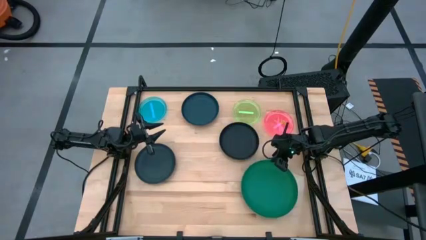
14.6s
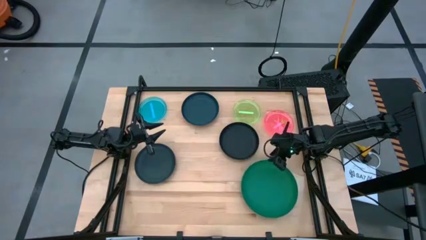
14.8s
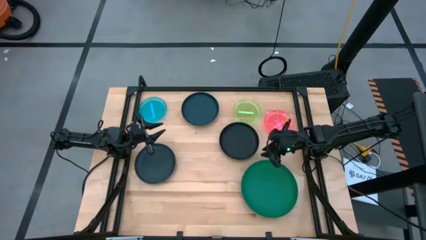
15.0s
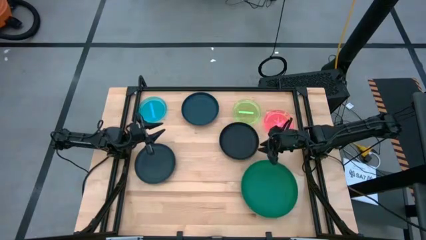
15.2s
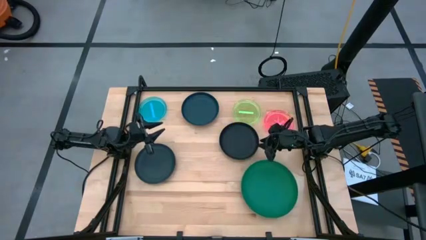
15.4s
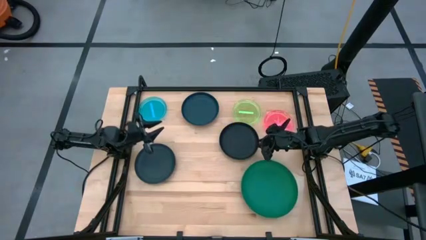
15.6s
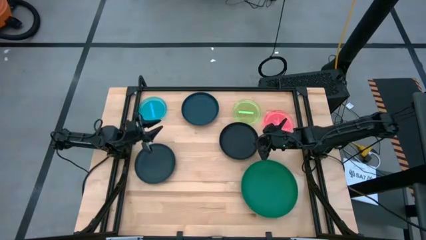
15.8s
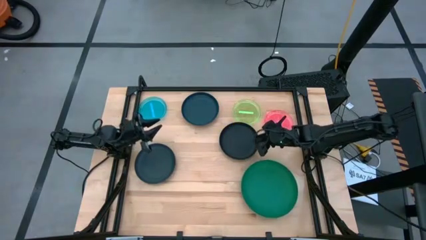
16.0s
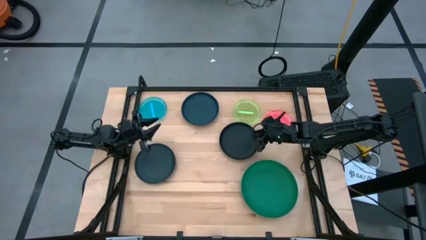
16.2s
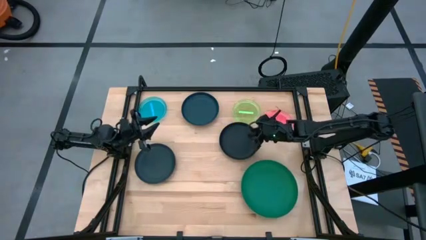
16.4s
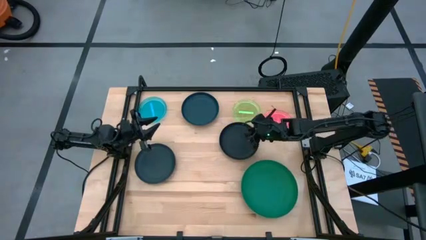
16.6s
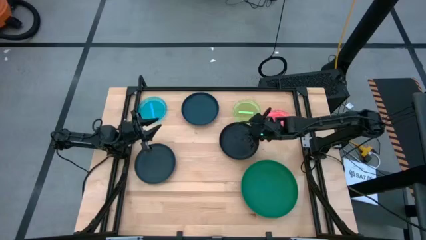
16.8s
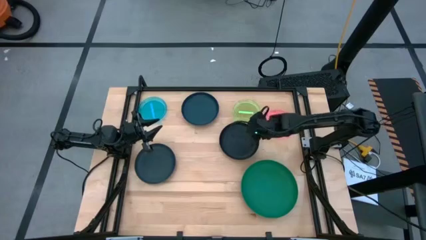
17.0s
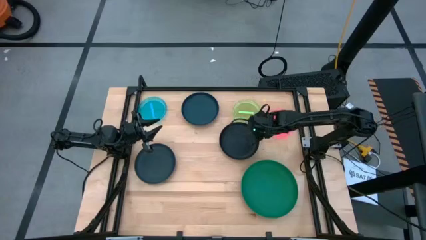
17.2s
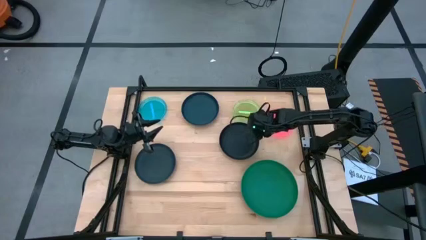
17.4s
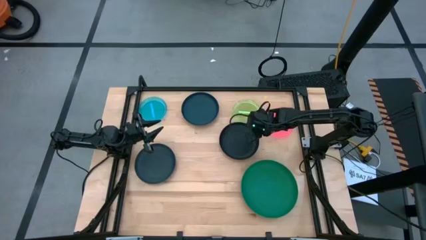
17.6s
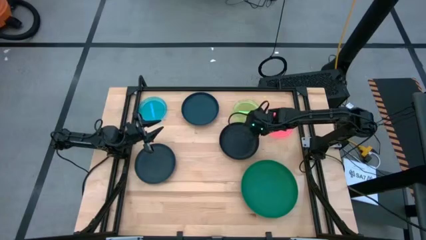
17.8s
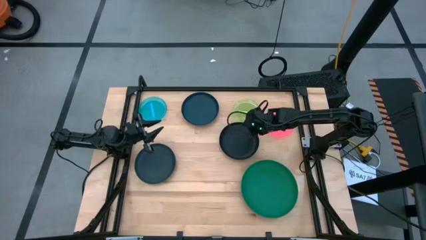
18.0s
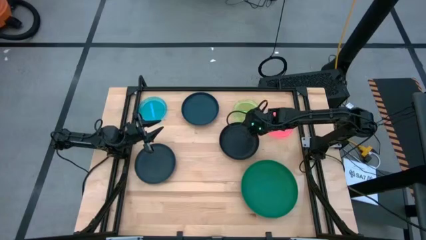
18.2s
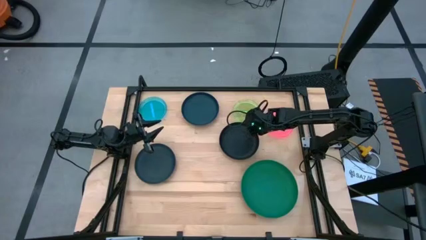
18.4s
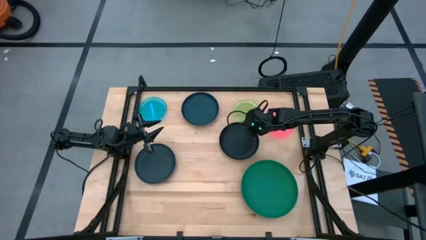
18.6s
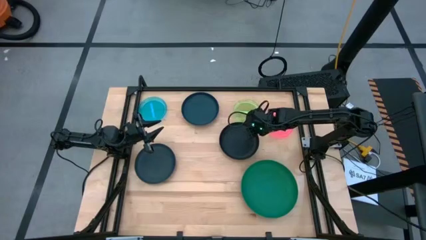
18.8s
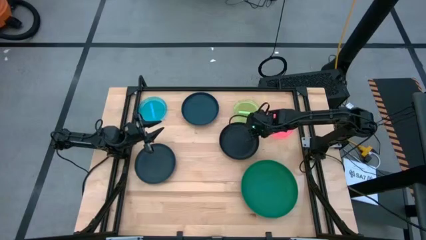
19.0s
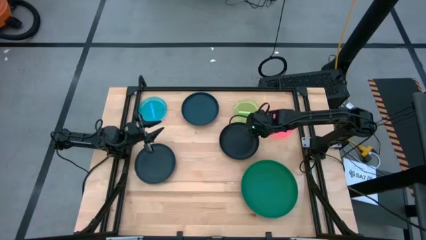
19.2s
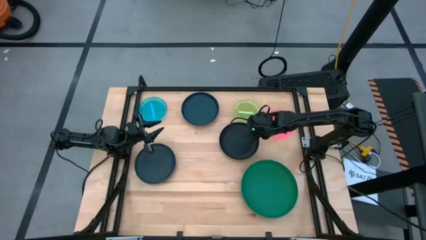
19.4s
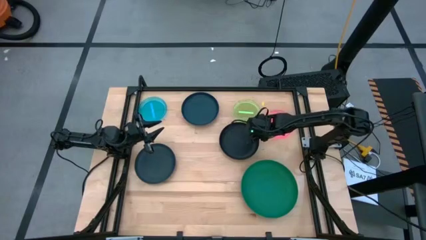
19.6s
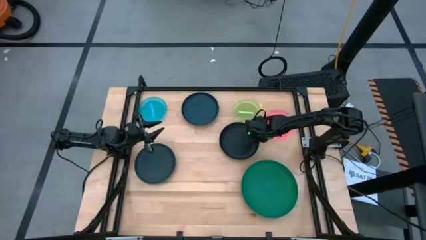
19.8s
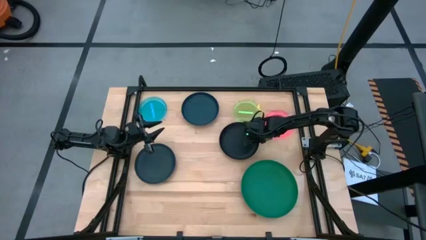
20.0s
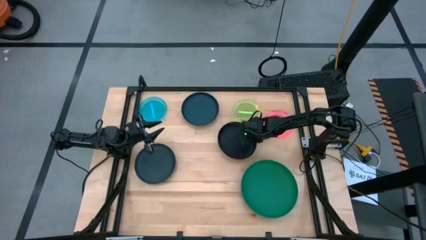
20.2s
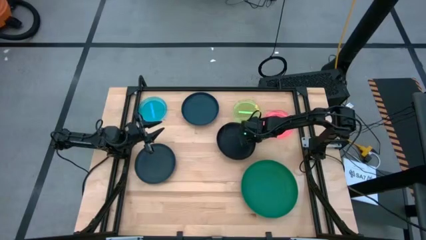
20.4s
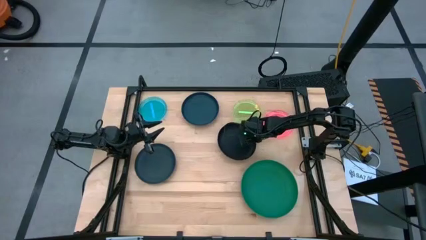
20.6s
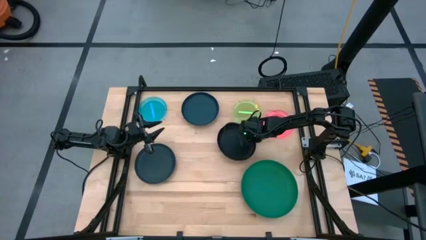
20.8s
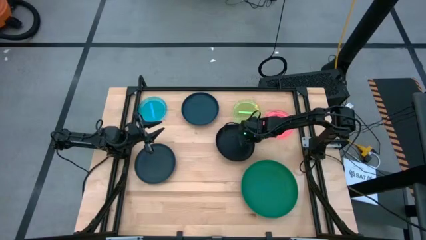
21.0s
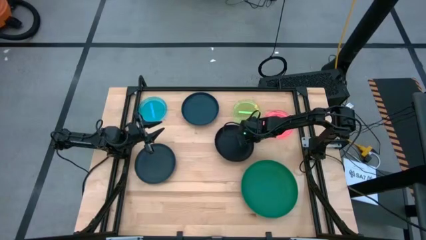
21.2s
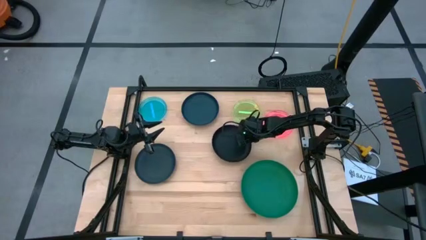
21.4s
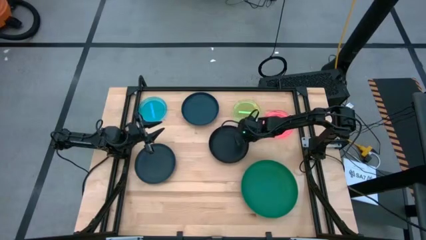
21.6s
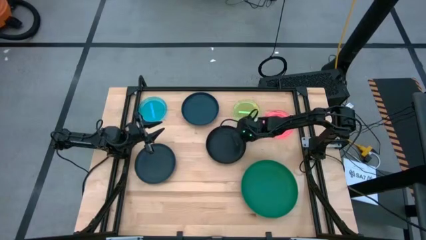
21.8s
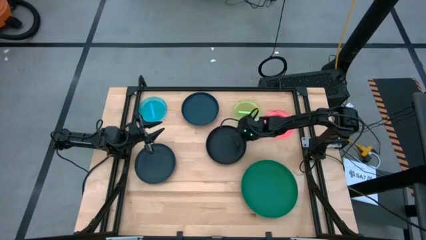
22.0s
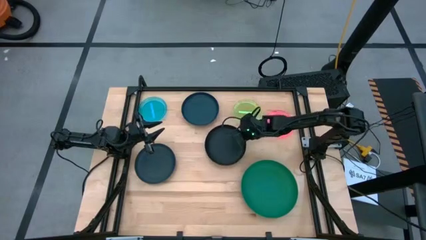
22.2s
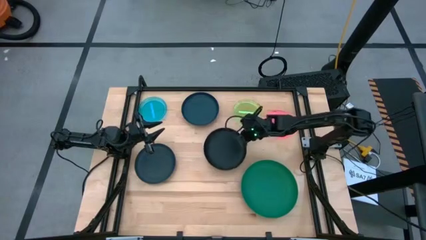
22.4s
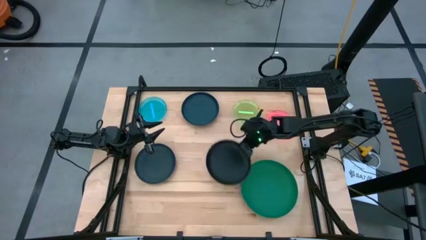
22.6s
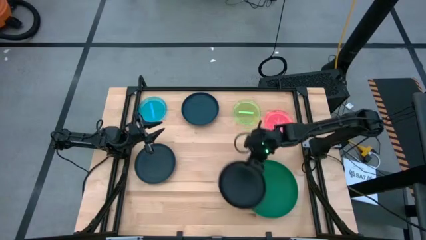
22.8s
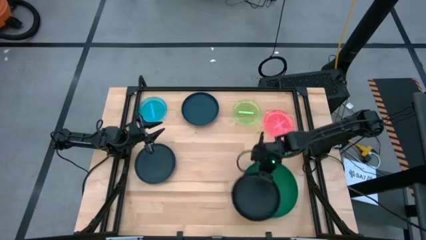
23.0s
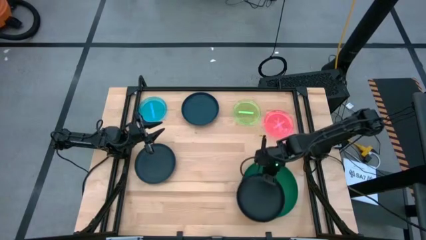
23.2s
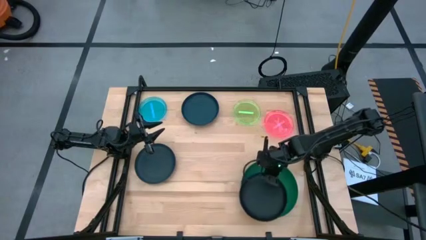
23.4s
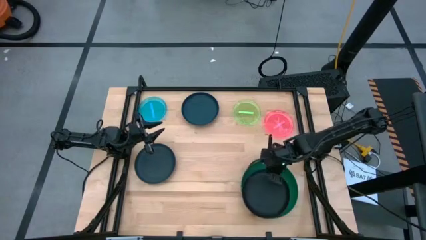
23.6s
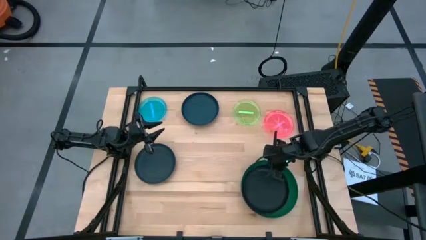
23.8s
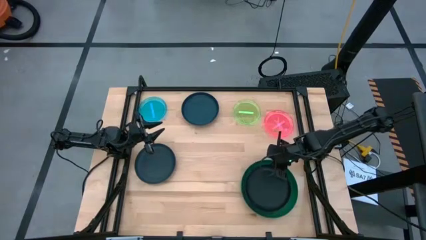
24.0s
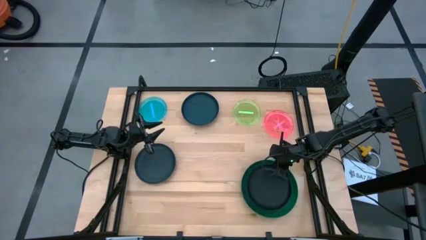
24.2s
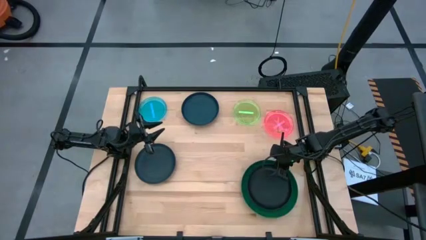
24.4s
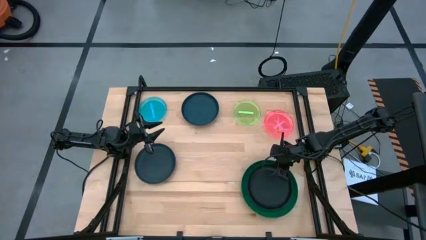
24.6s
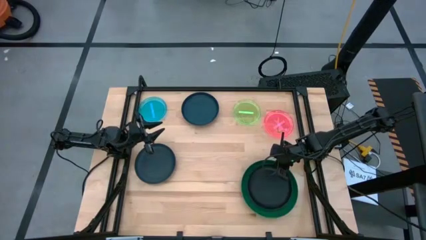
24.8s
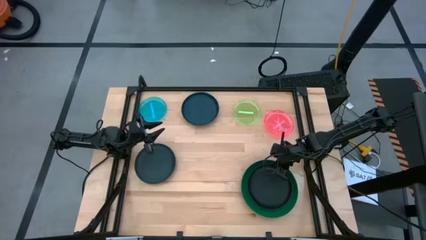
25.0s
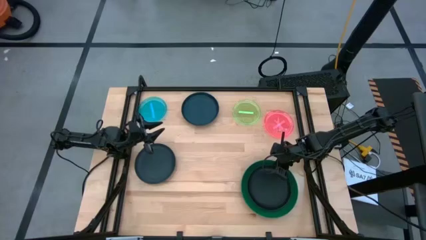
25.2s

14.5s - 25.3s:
Task: Stack plastic plates
Stack the black plate on top of the green plate

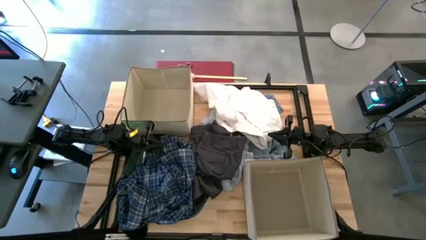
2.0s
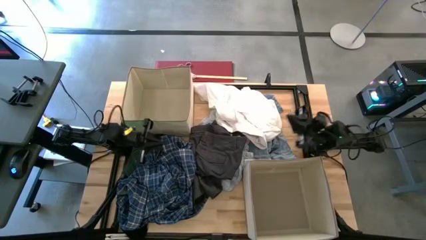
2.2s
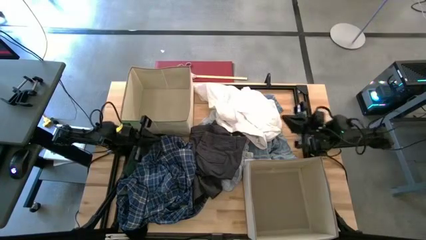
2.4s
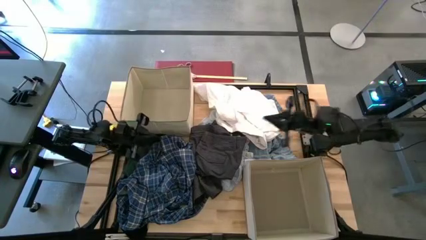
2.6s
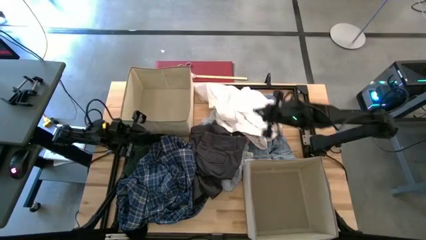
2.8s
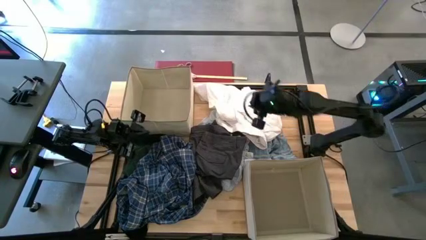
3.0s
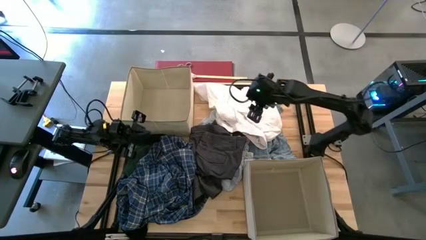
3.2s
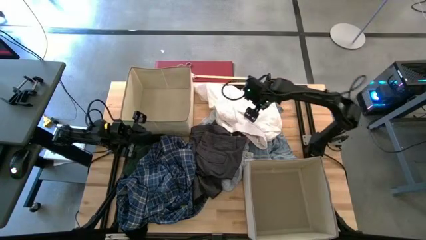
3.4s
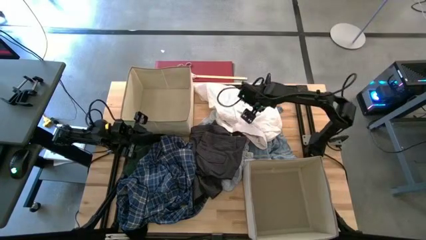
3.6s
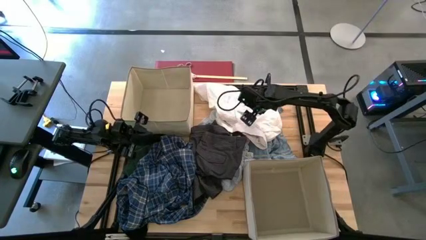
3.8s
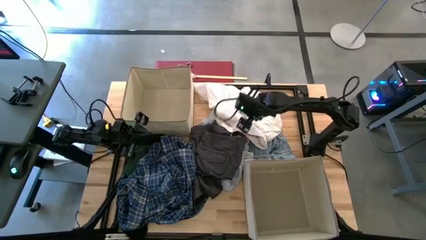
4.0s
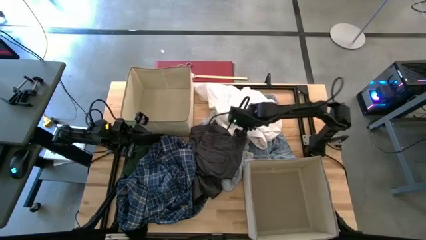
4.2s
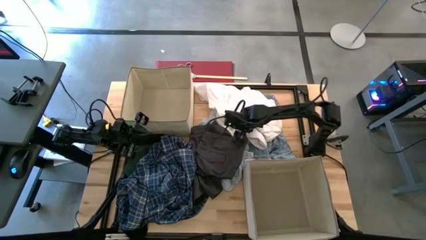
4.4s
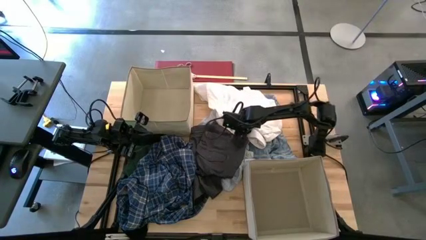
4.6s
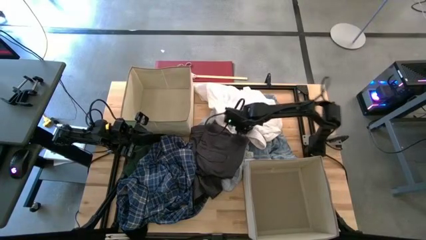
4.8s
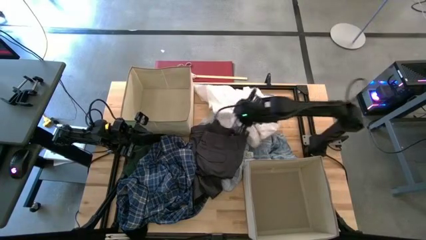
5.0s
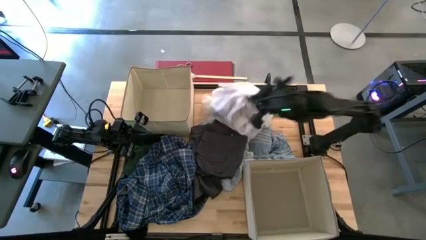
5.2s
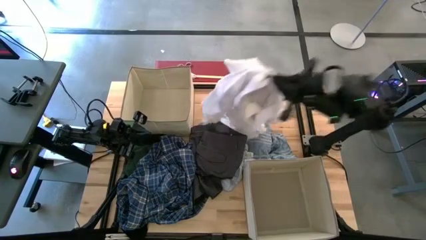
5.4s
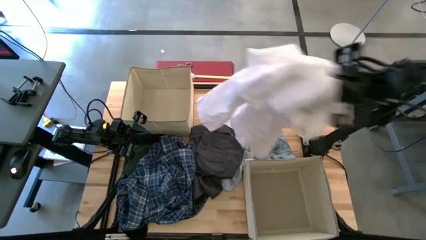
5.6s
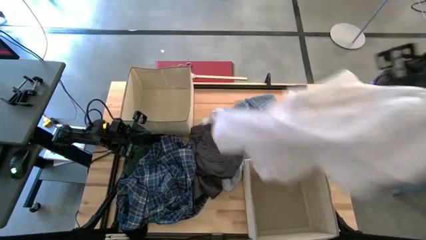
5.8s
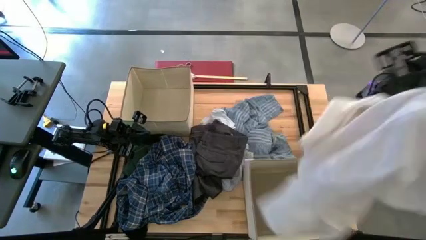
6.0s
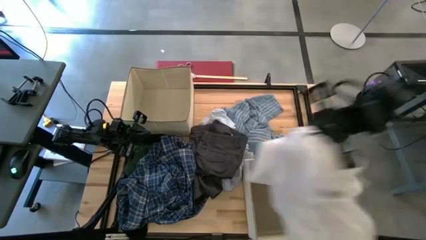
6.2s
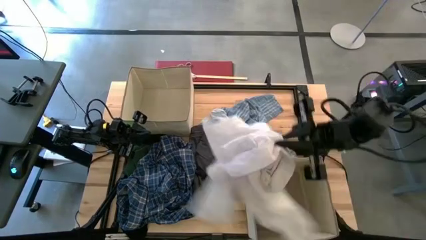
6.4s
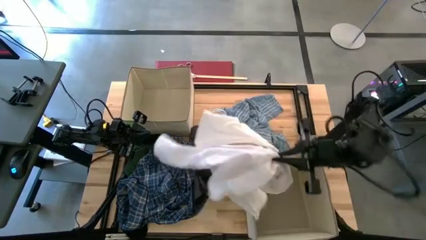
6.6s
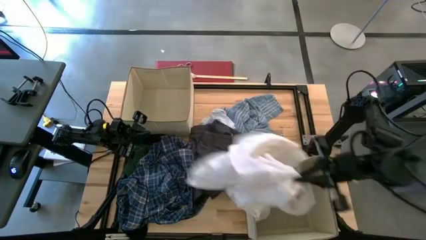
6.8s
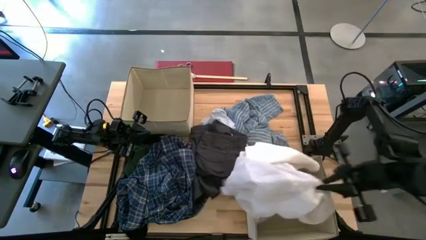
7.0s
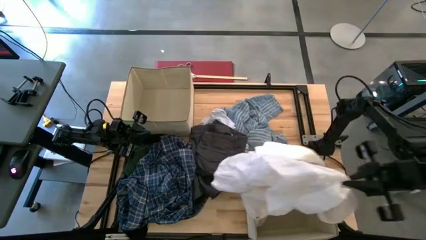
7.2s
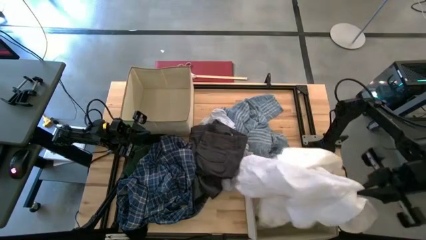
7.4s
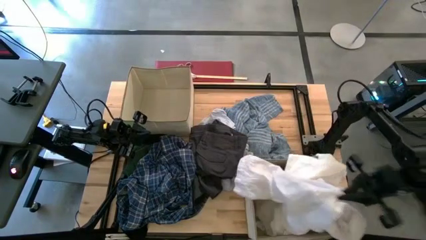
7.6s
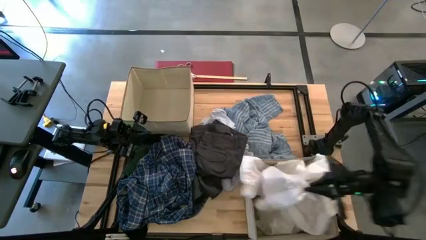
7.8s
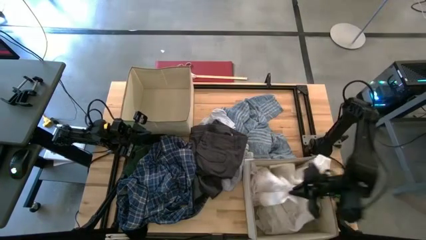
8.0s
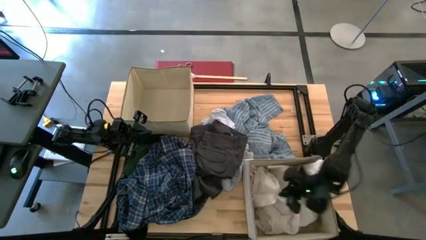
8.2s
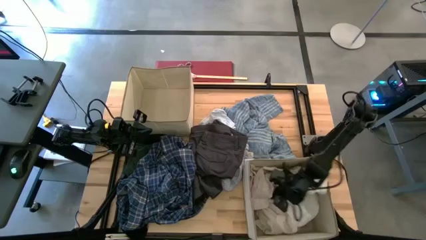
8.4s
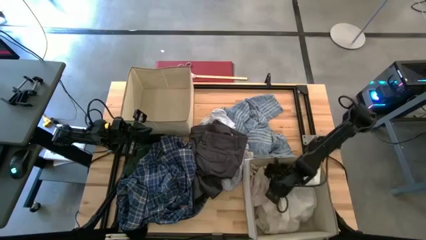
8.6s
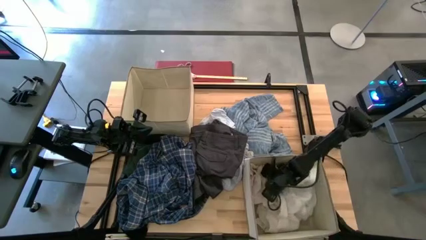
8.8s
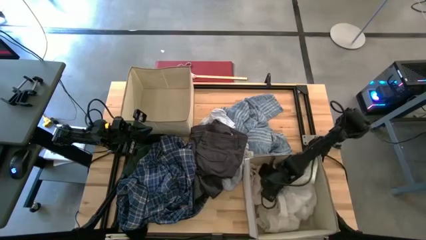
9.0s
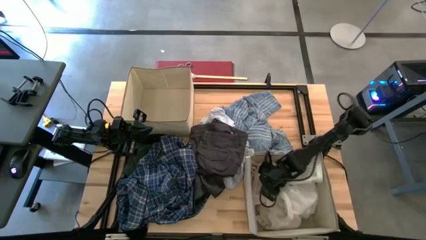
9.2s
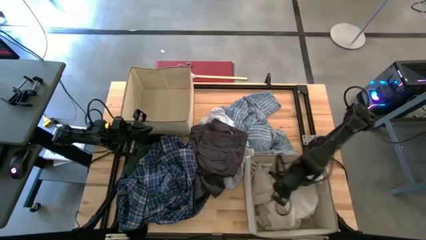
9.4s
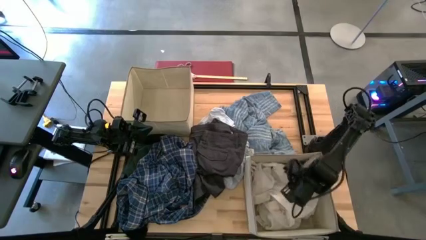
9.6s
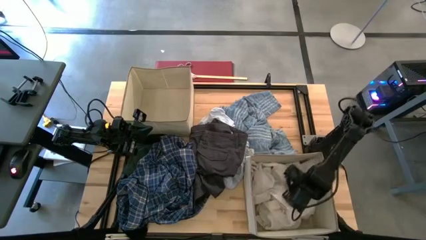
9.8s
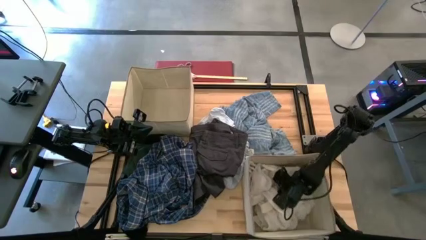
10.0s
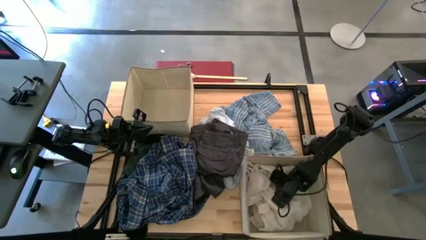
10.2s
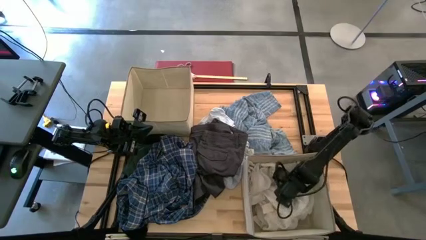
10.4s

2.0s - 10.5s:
Task: Sort clothes
Put the white shirt into the bottom laundry bin
